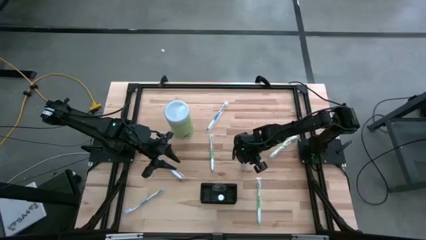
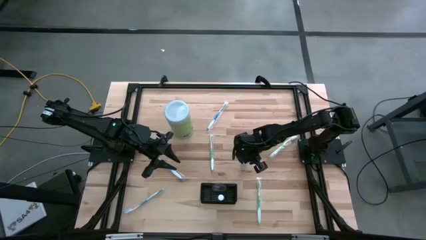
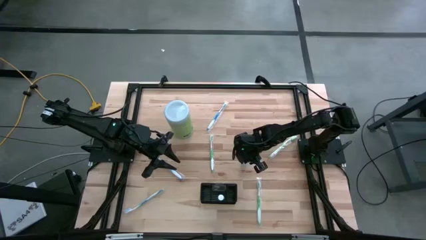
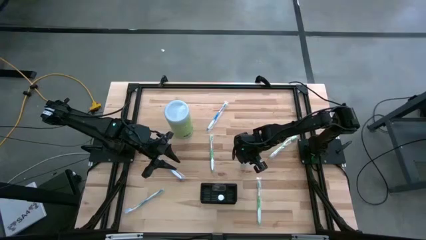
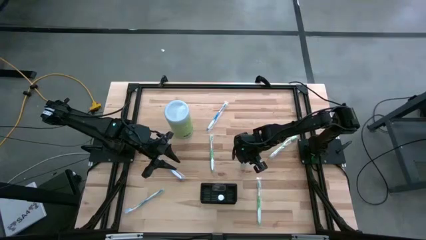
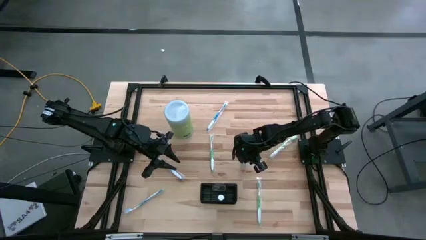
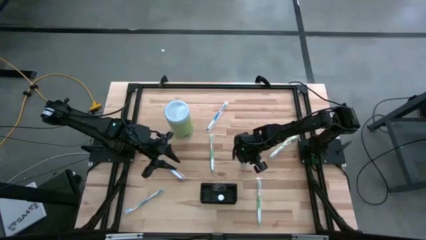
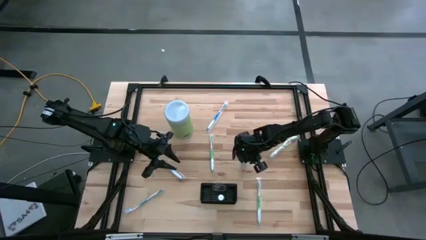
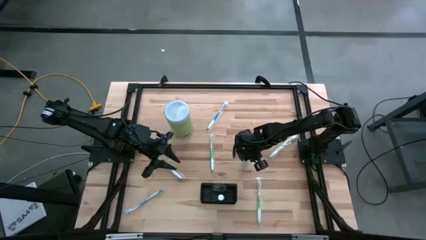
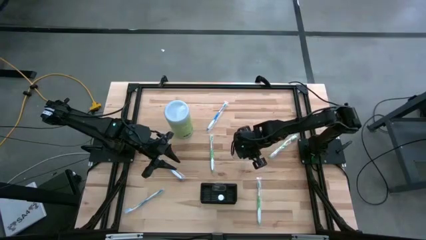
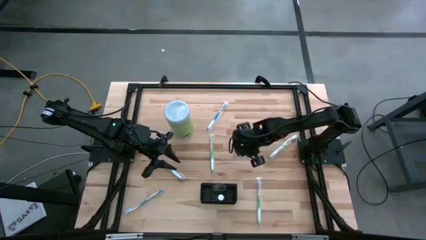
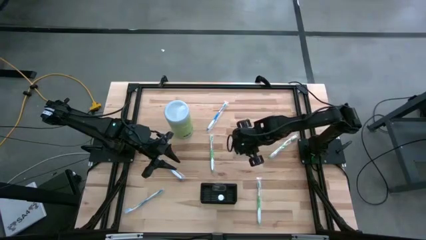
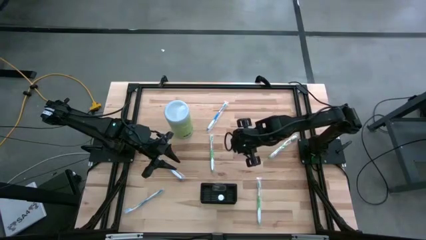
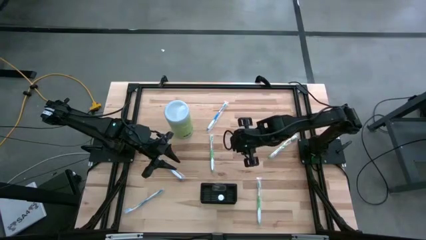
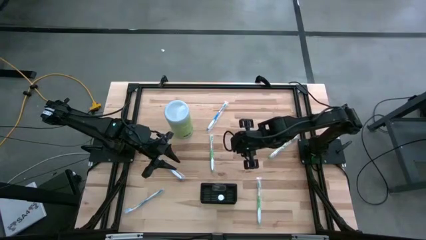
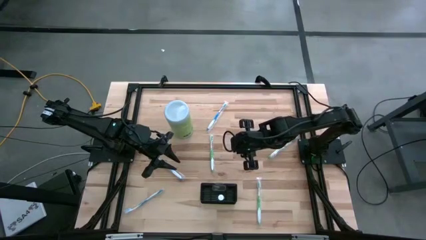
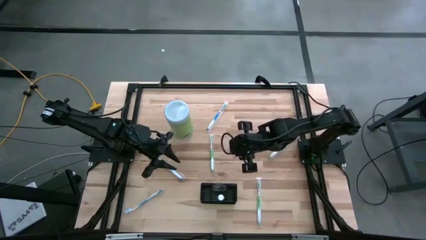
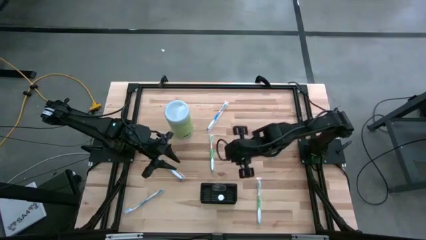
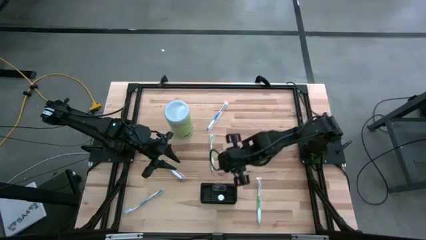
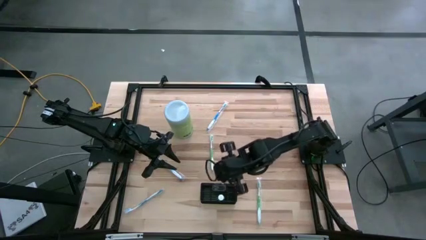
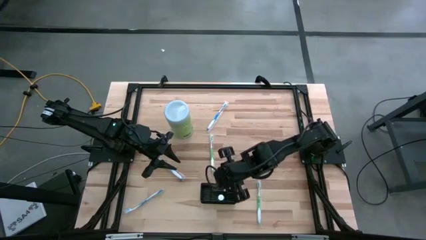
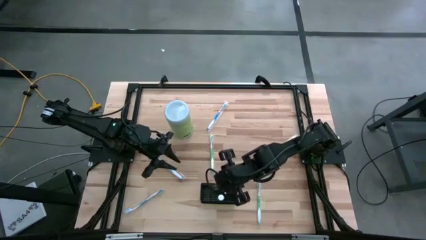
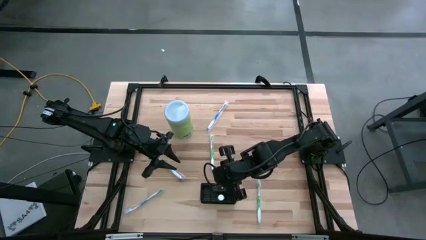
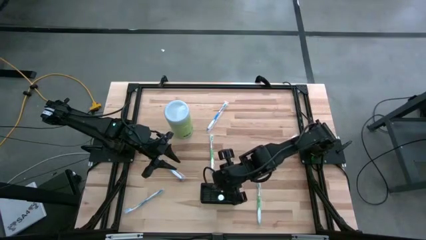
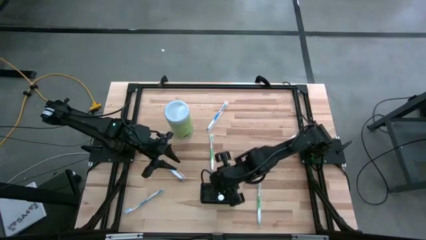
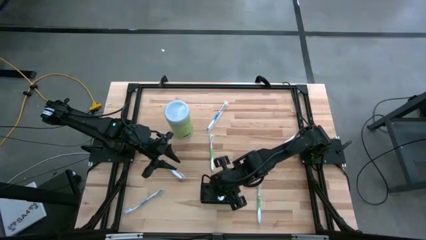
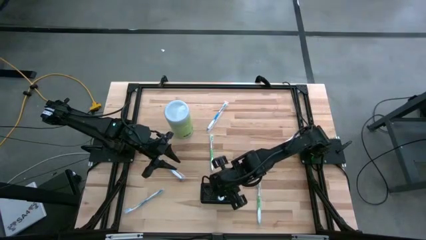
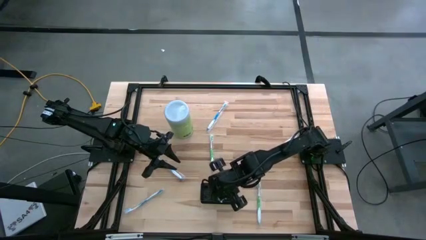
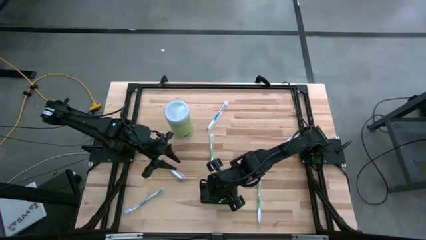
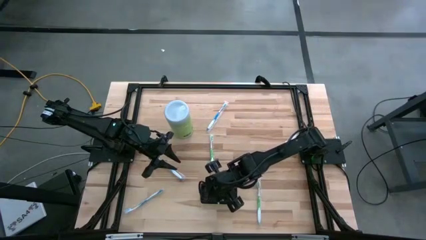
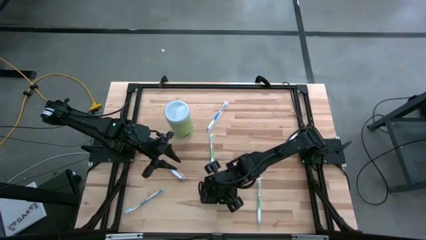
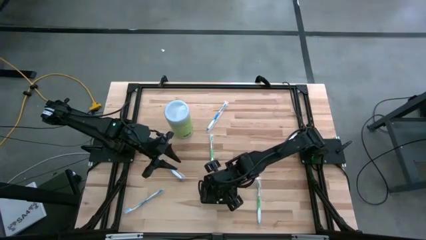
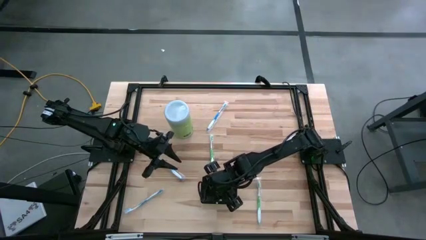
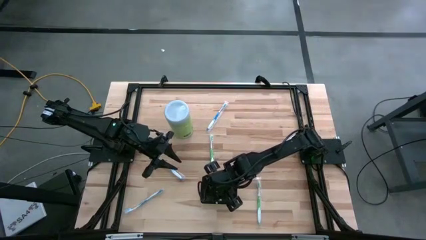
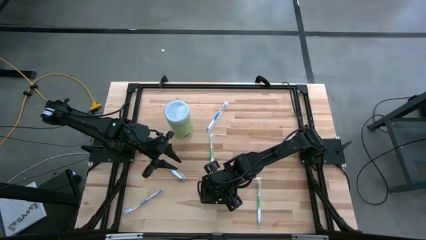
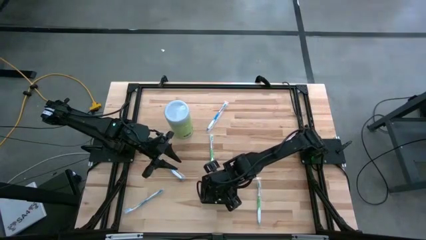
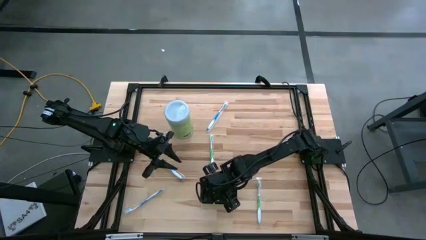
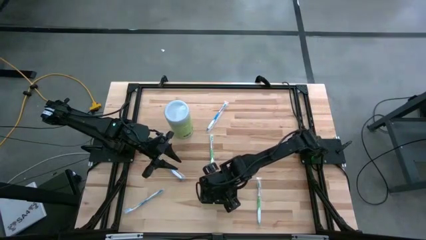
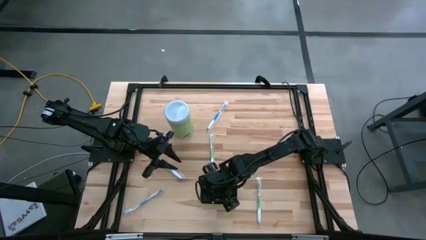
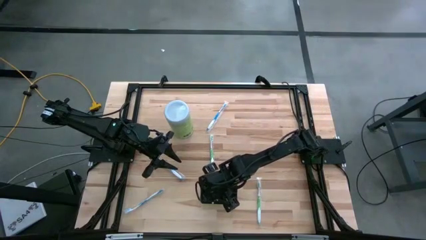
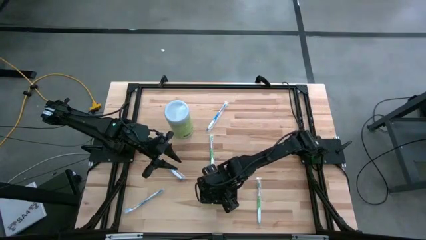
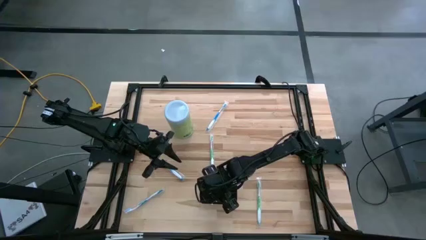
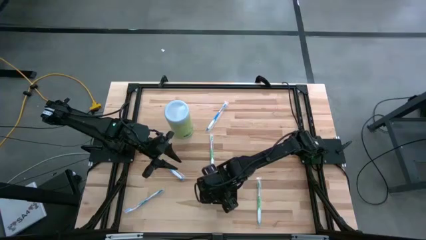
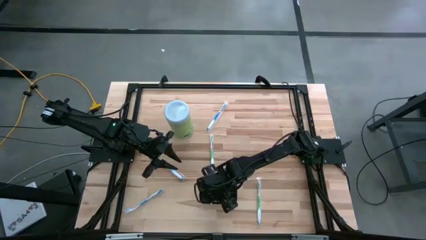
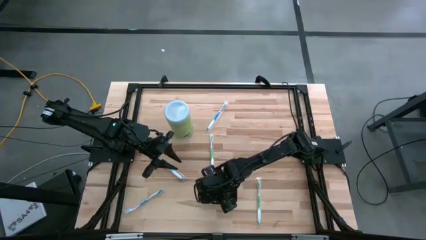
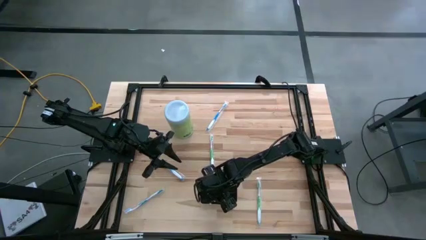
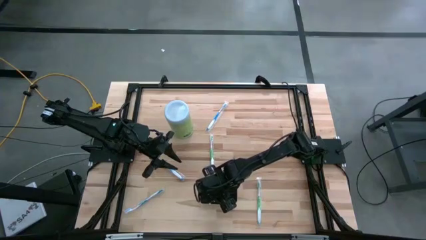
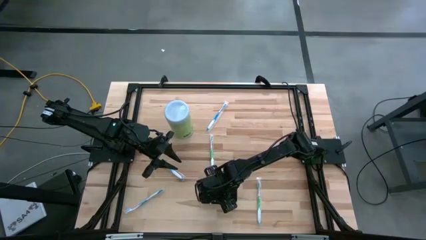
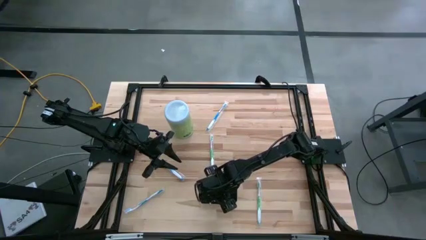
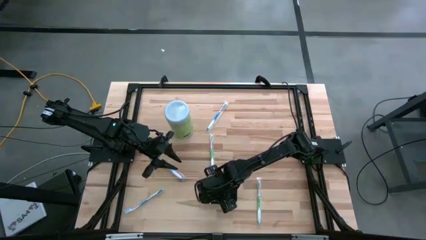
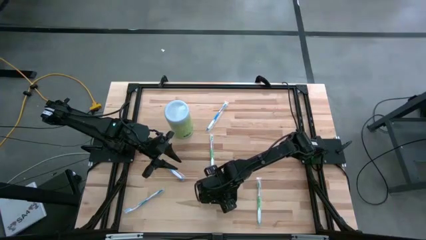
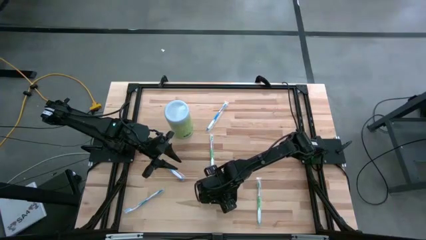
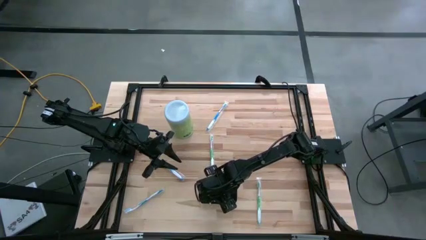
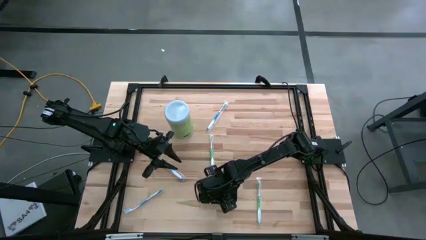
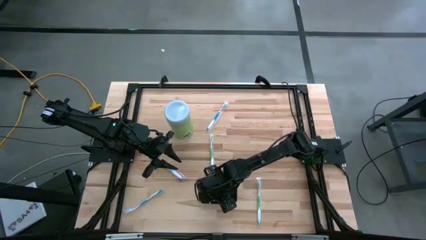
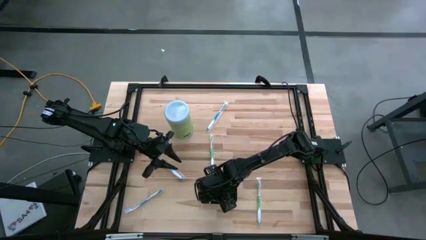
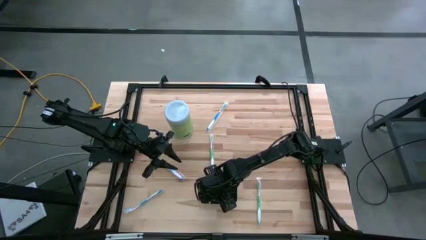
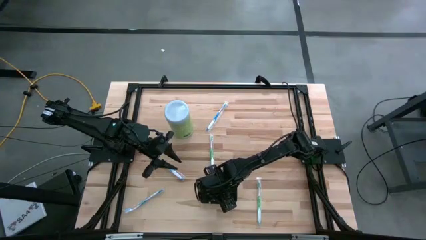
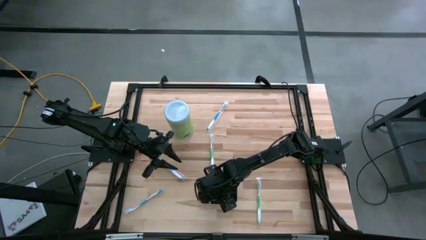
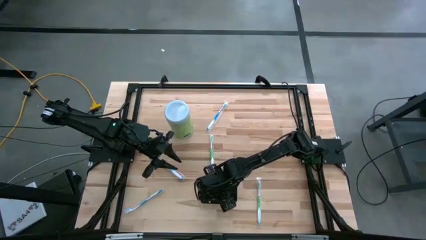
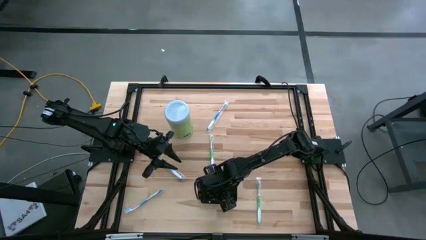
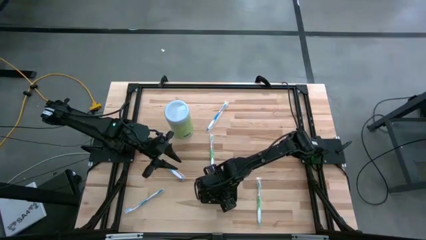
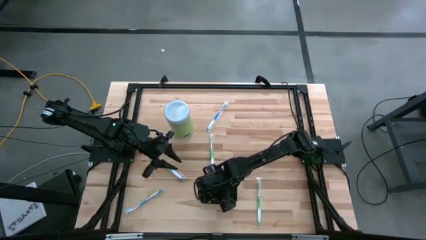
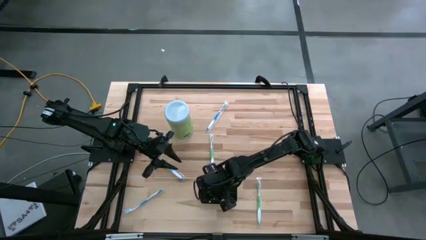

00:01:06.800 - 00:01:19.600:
Task: Pick & Place toothbrushing station
Put the mouthwash into the mesh organizer
